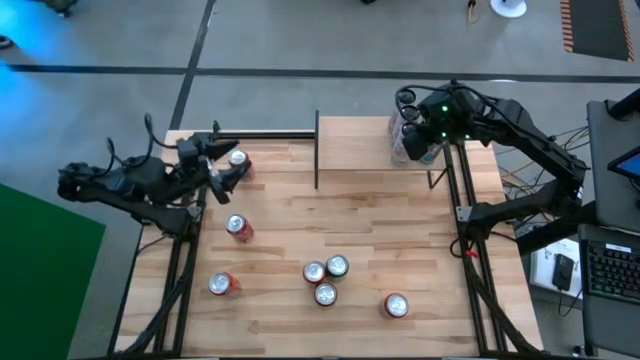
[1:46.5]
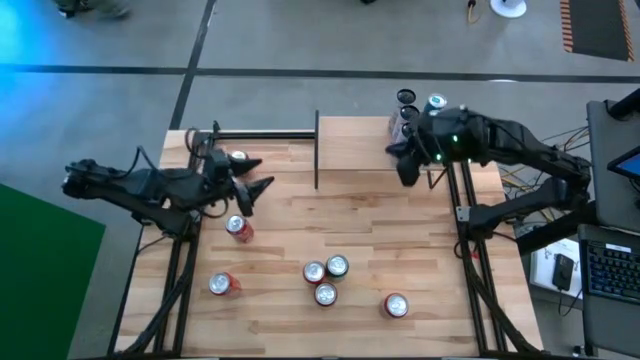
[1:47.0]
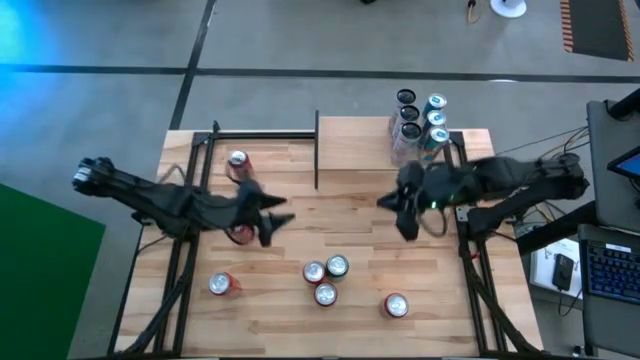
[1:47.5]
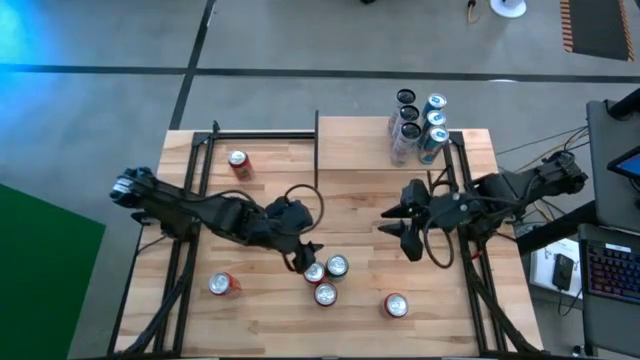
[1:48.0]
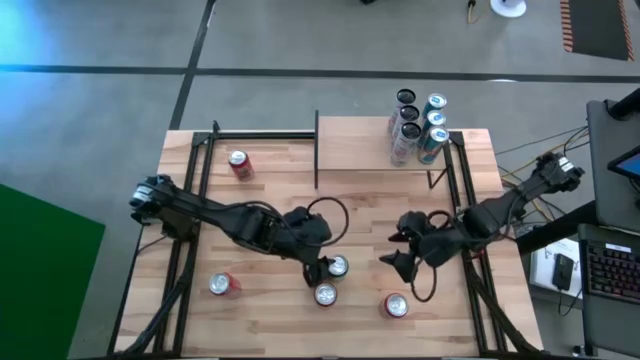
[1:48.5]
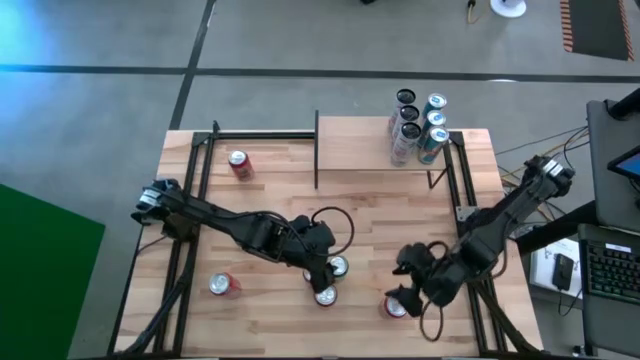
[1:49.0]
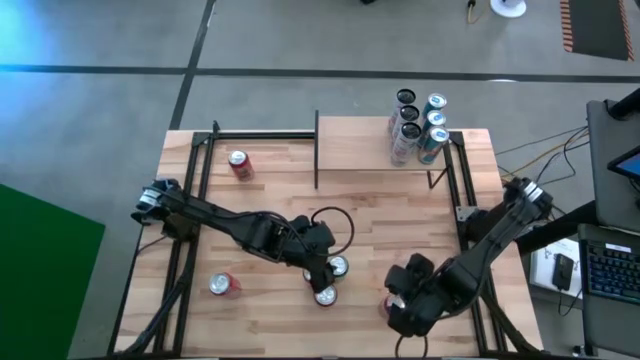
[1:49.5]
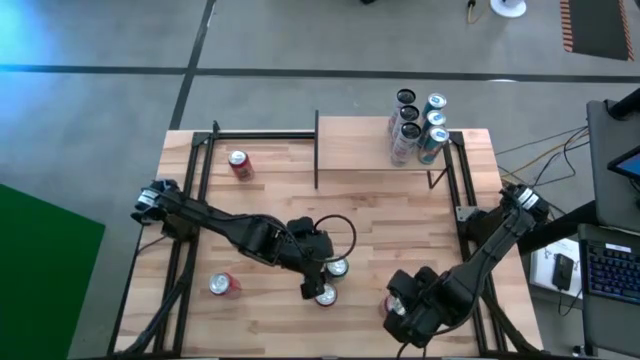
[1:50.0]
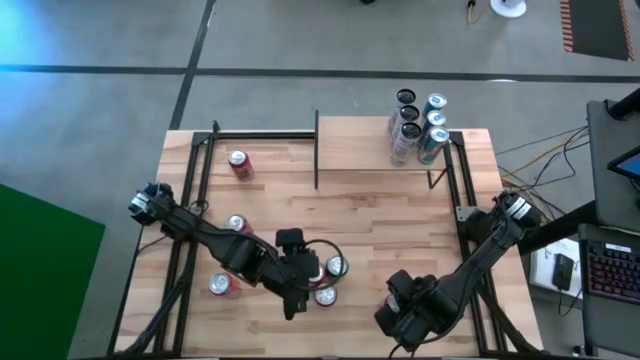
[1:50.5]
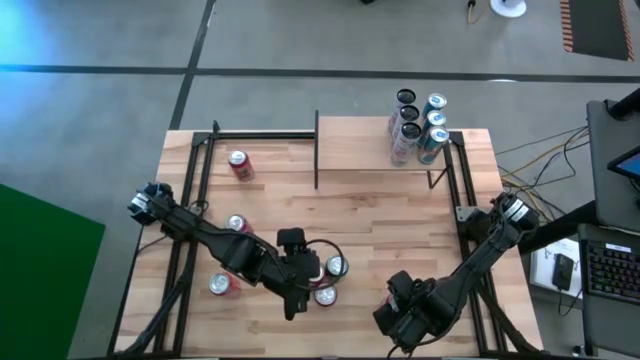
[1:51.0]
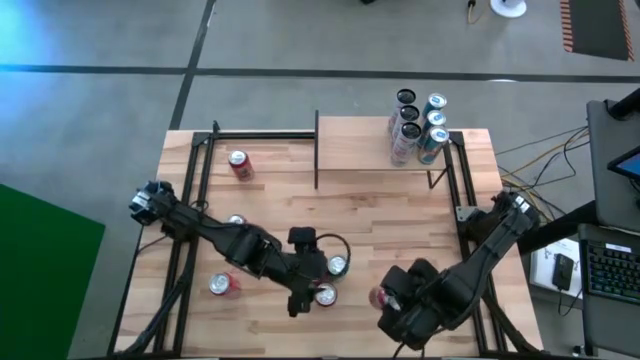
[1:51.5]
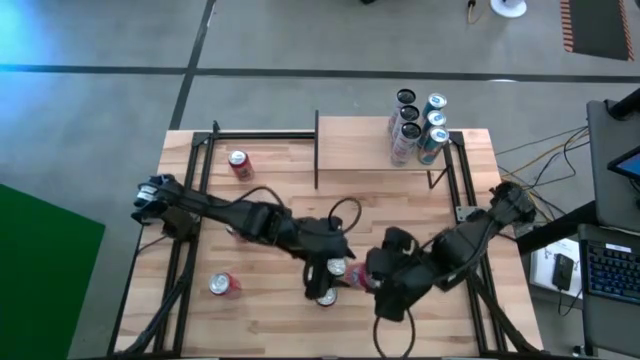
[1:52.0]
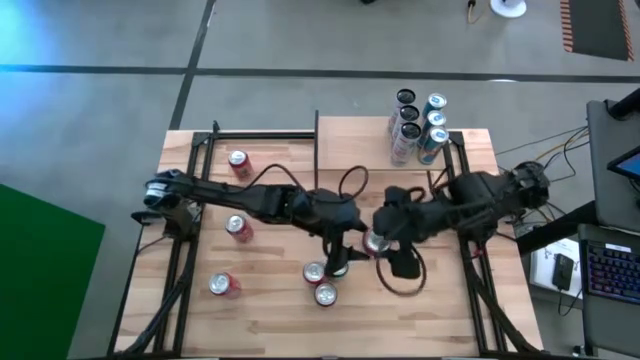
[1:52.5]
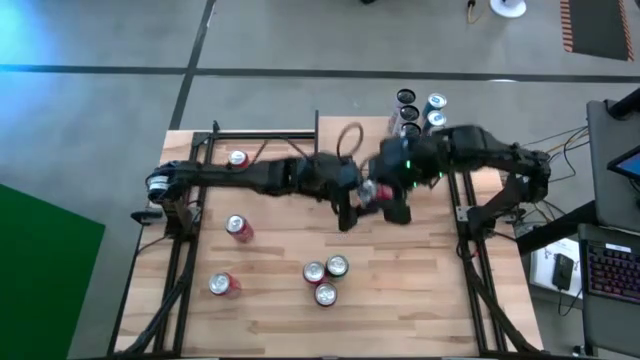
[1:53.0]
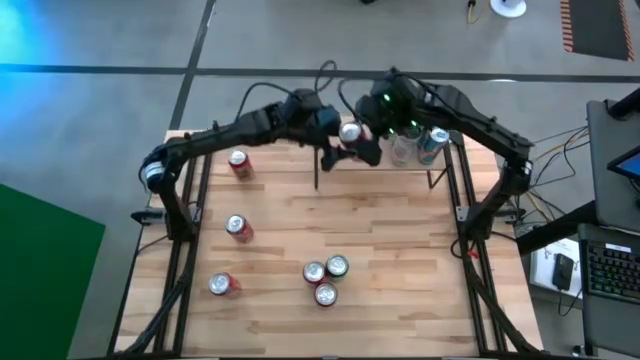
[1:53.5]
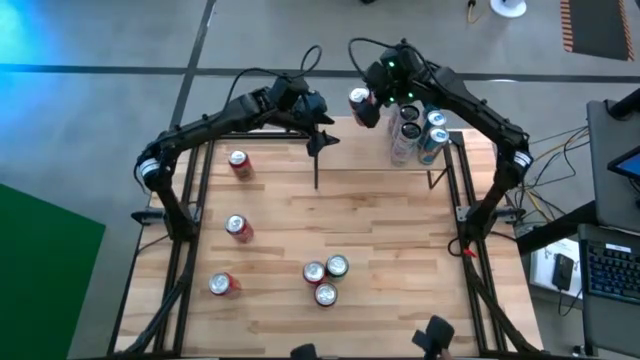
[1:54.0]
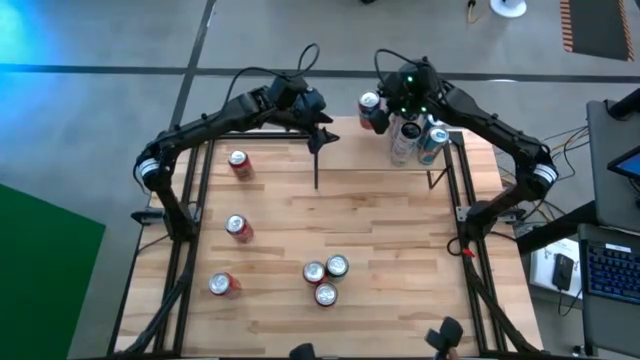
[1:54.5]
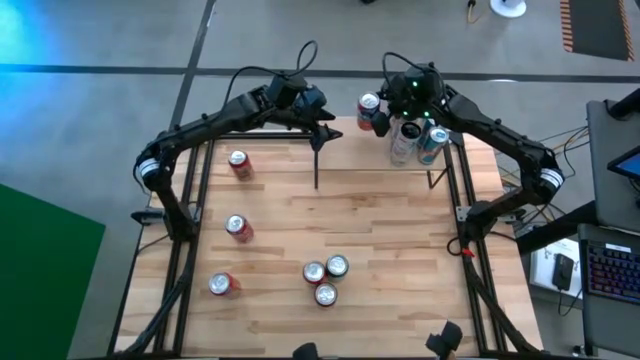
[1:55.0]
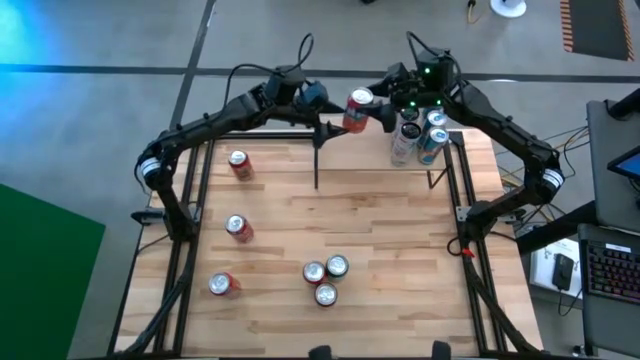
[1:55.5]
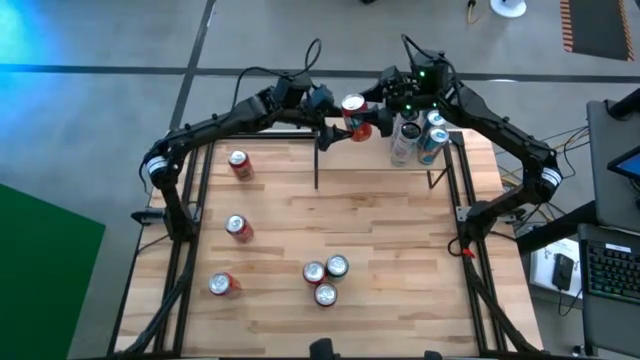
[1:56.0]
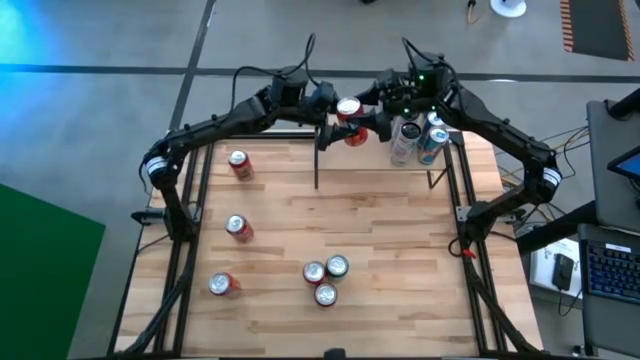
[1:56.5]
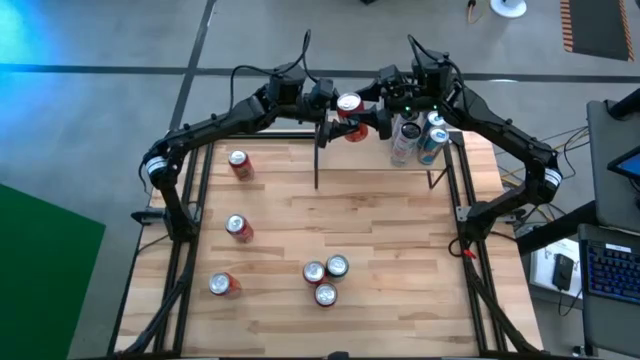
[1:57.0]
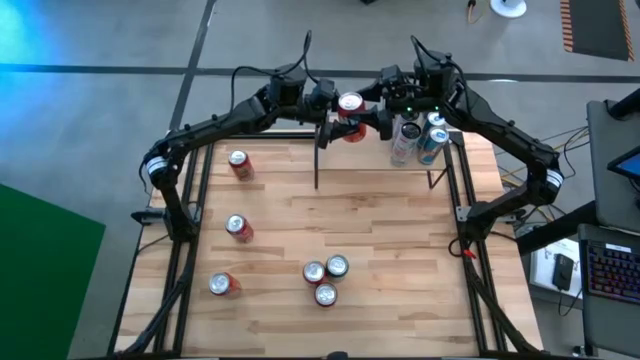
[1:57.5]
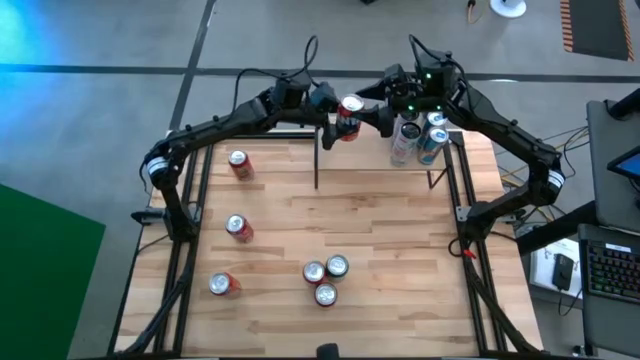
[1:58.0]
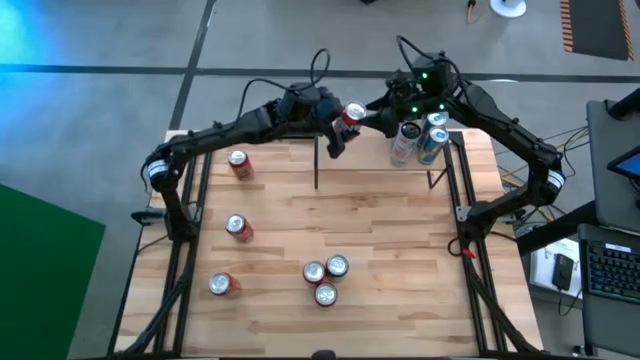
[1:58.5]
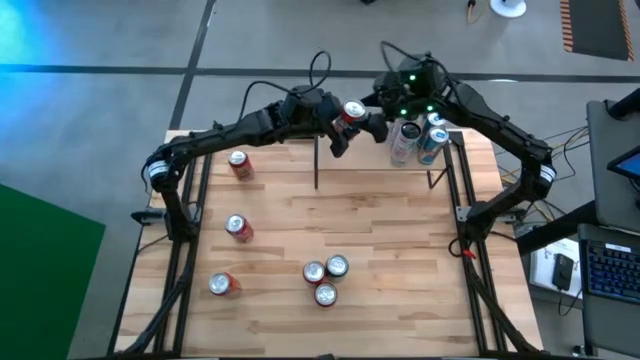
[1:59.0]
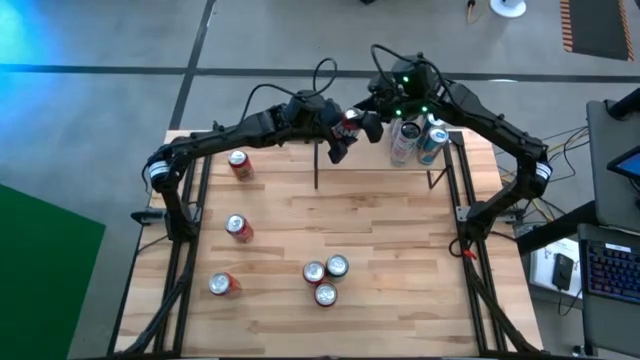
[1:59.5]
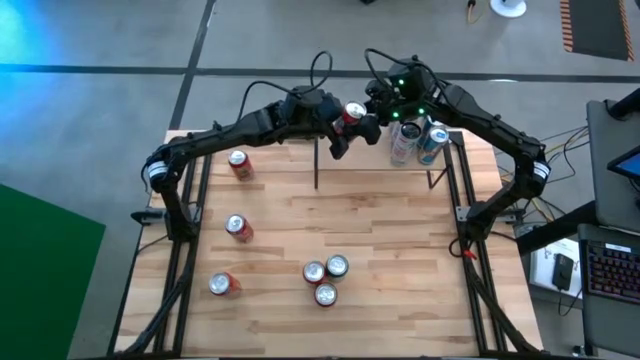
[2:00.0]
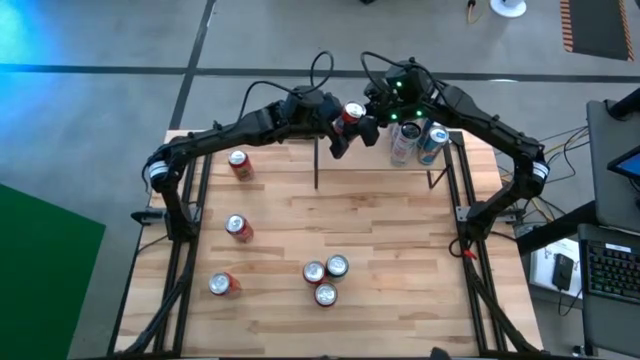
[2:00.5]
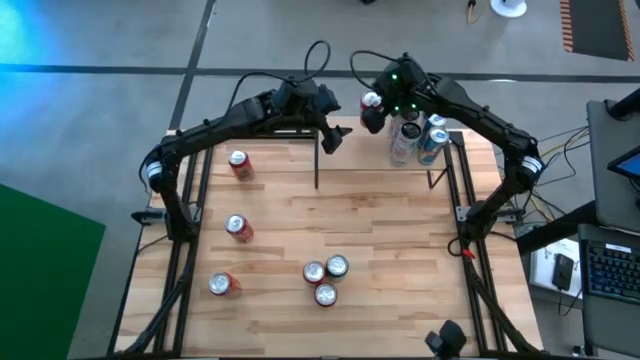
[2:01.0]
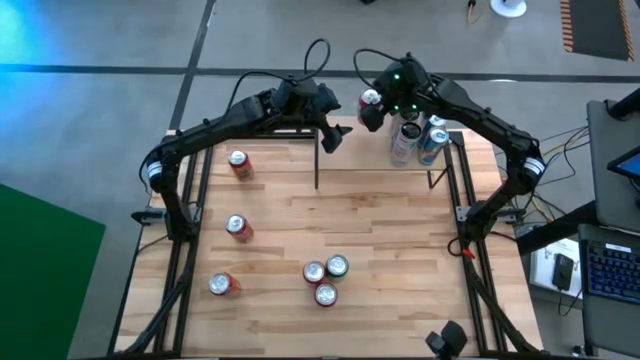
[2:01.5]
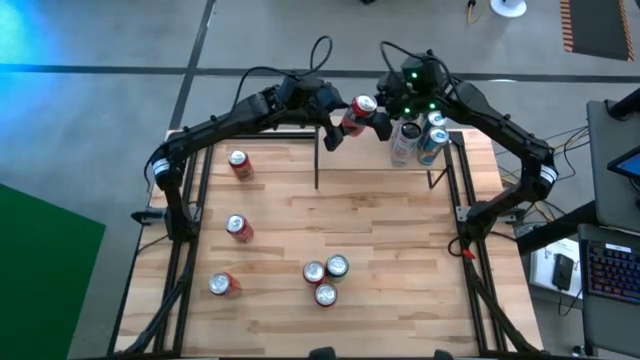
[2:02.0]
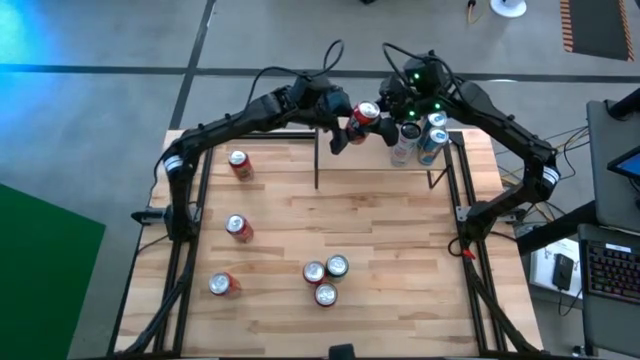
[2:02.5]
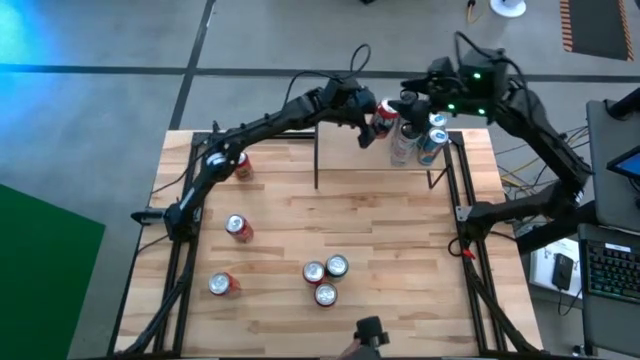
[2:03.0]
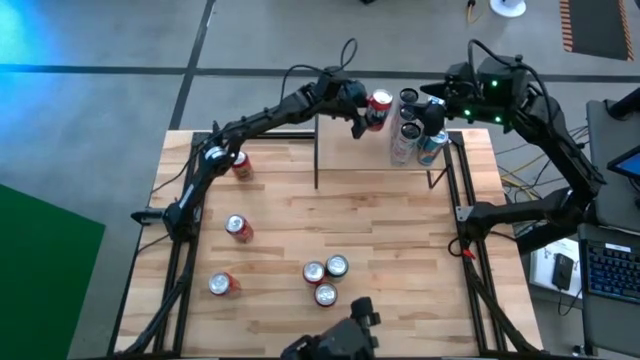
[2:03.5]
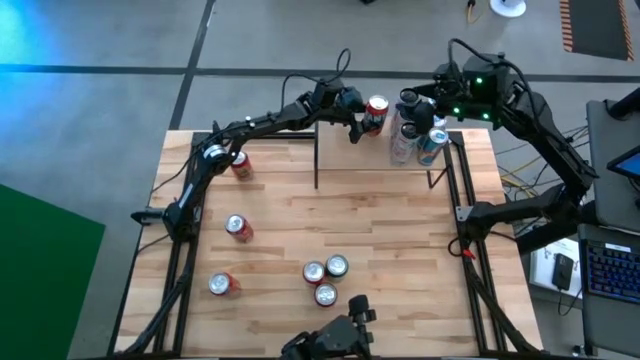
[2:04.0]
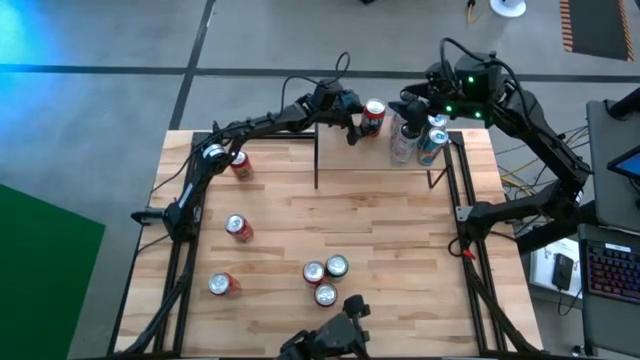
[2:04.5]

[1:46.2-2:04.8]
Task: Place canned beverage on shelf
Put the bottom red soda can on the shelf

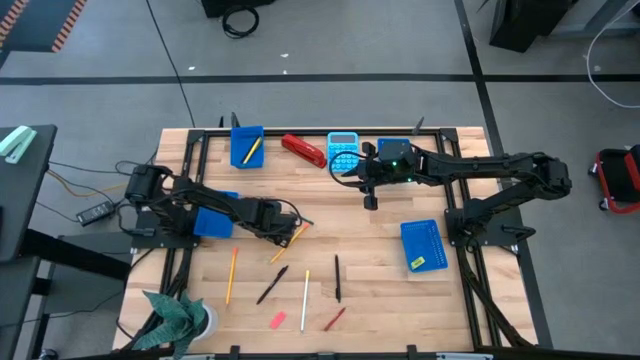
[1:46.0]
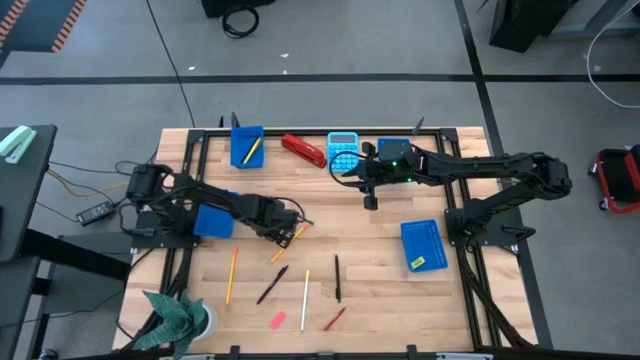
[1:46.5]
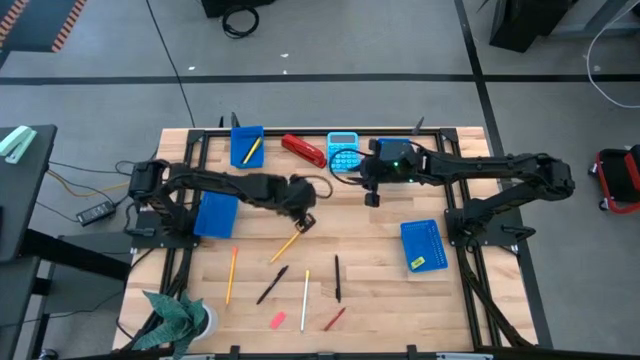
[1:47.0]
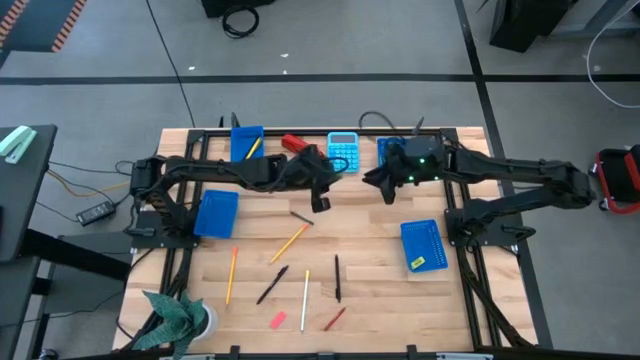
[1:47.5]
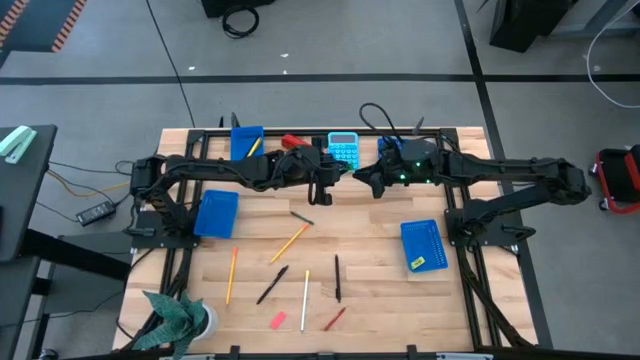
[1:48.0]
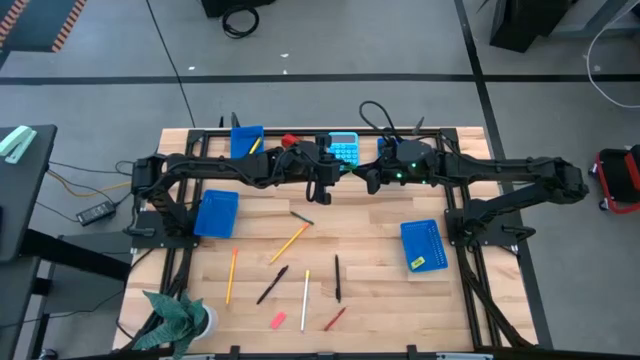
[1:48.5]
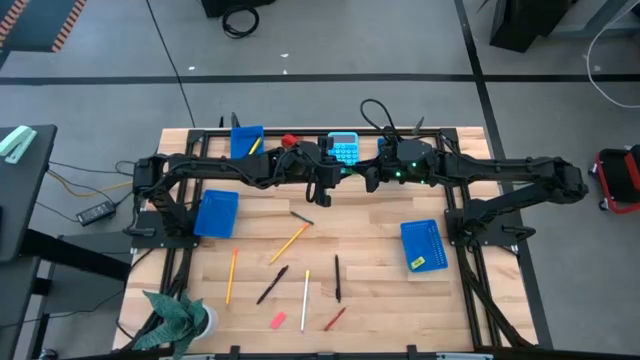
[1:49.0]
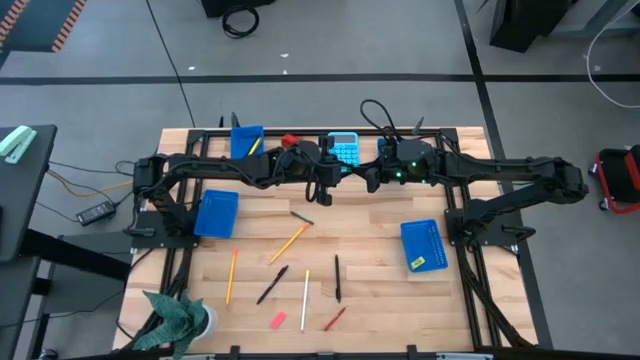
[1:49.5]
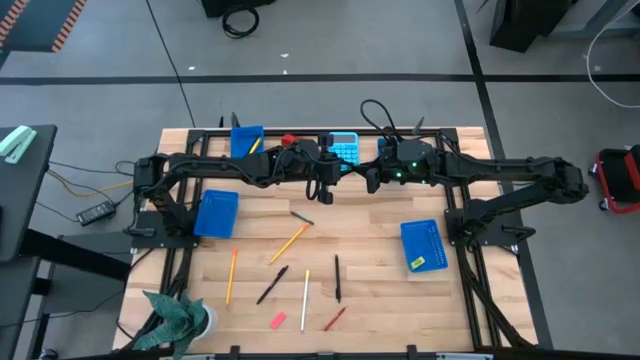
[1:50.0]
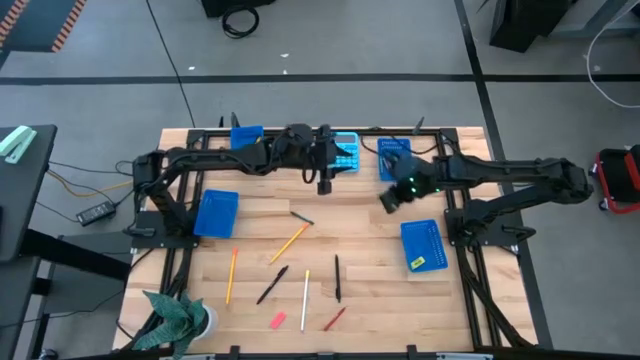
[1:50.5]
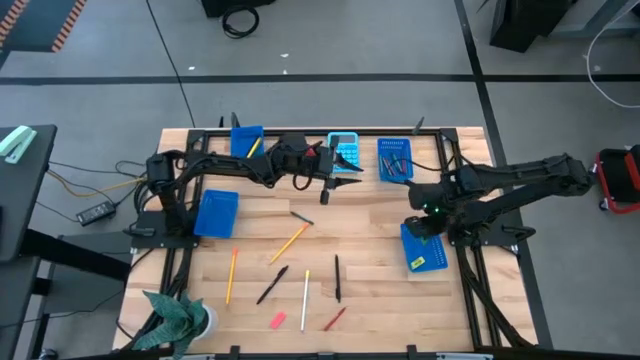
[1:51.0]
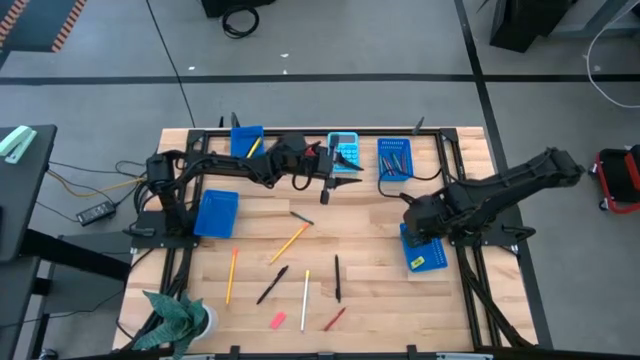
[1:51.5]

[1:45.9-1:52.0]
Task: Sort crayons/erasers/pens/pencils in bins
Put the green eraser into the bottom right bin
